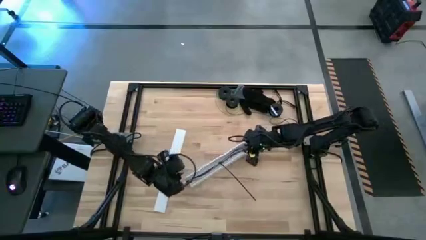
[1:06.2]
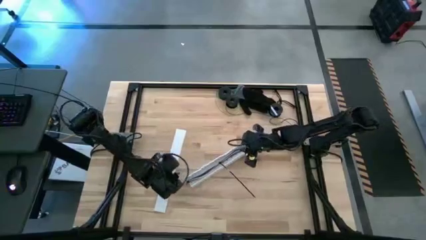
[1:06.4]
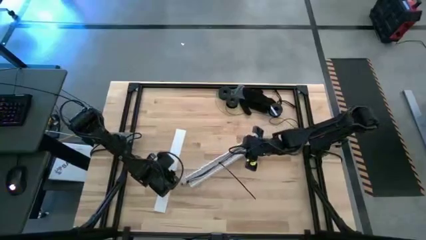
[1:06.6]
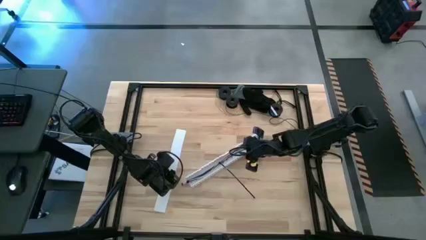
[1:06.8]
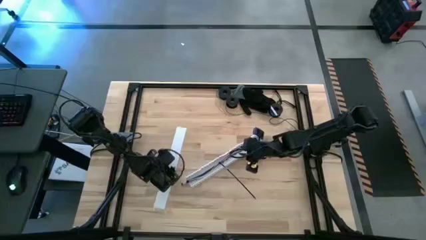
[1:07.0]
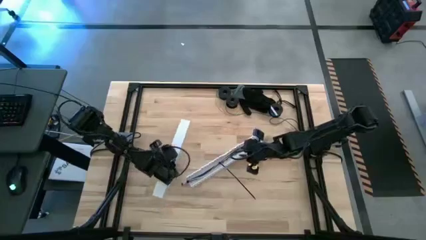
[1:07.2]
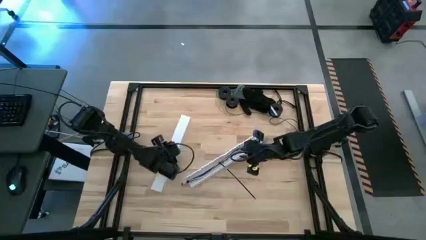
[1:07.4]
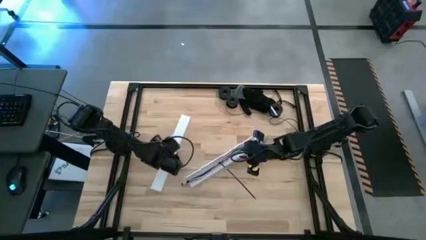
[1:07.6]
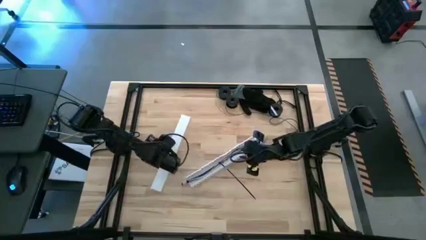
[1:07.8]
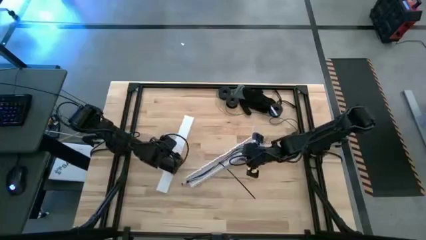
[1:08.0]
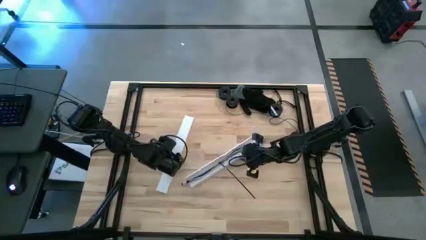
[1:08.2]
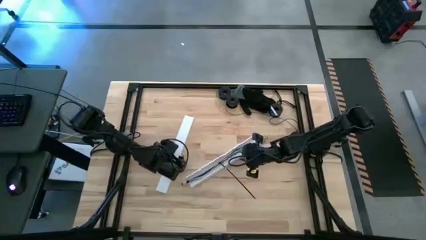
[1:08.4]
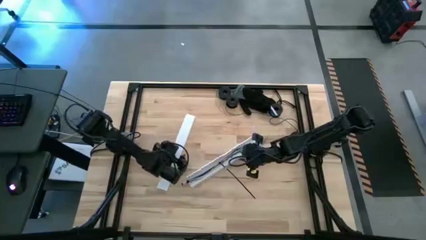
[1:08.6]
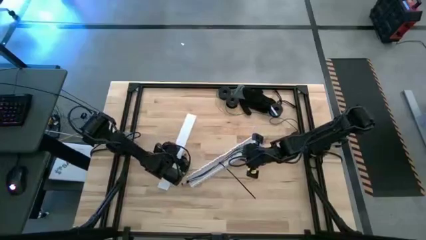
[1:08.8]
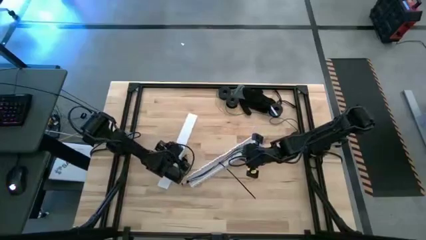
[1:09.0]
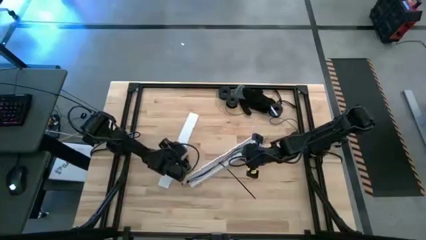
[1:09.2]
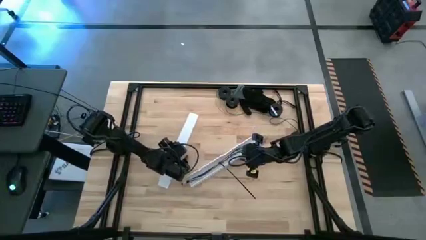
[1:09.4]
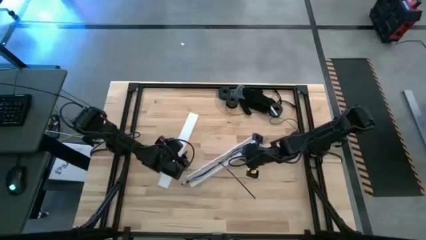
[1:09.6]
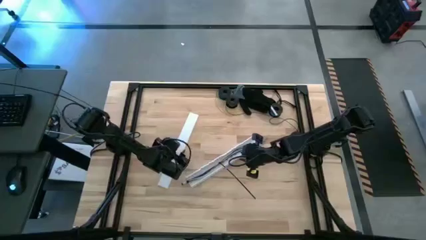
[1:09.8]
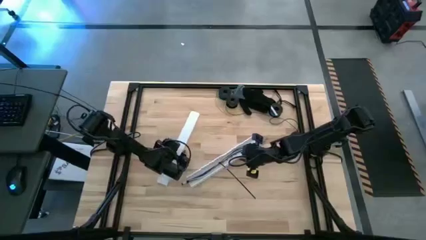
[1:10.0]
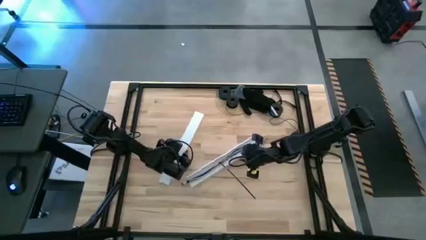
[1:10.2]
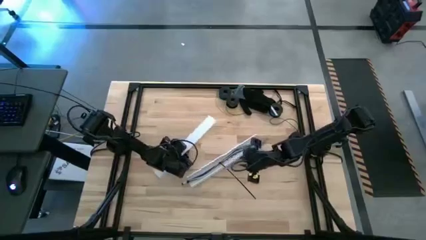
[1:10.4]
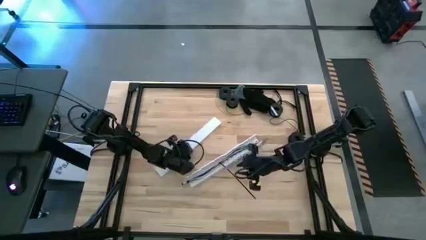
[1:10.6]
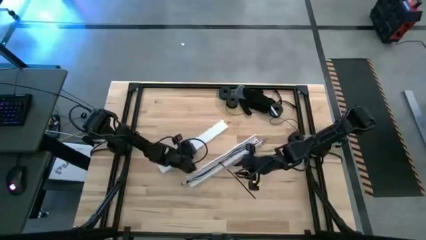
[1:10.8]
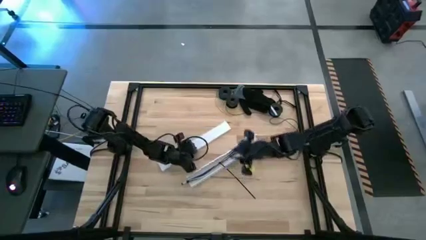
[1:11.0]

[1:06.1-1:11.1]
Task: Ziptie cables
Close the white cable duct

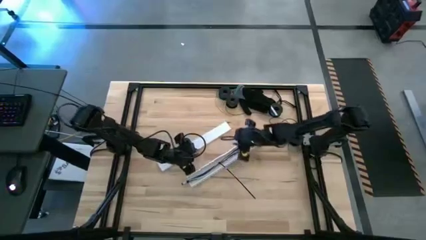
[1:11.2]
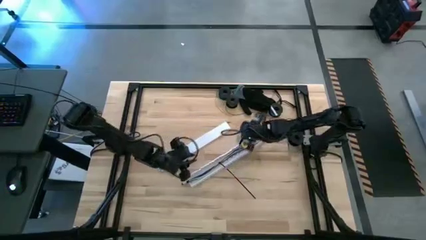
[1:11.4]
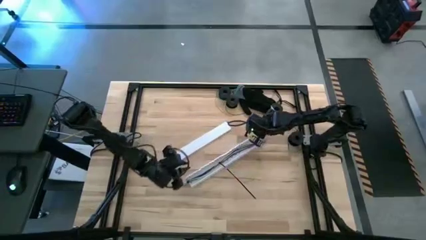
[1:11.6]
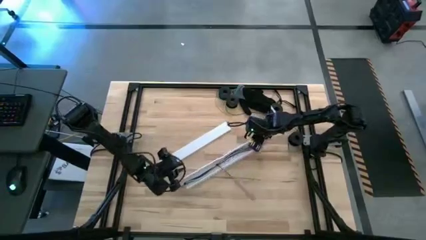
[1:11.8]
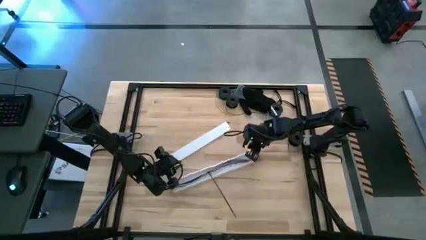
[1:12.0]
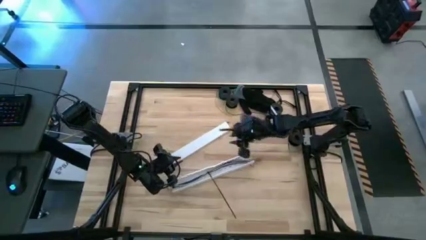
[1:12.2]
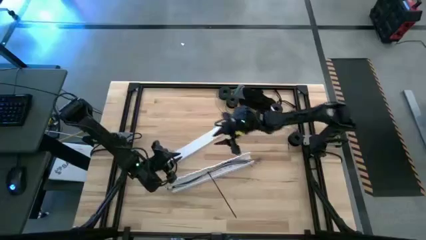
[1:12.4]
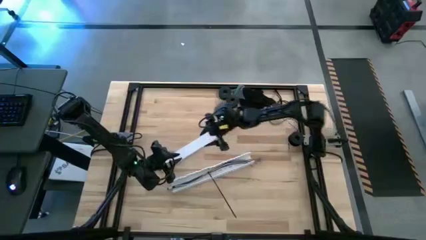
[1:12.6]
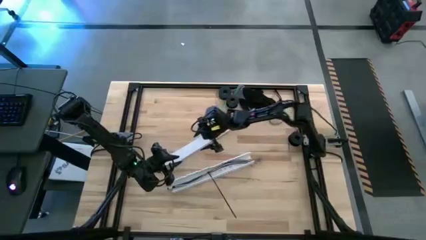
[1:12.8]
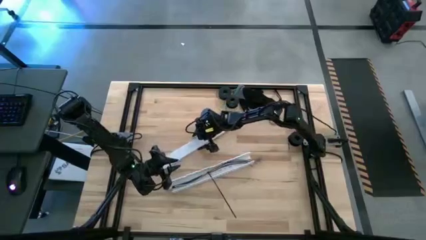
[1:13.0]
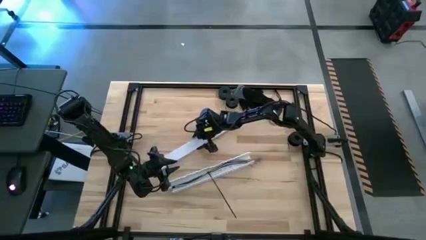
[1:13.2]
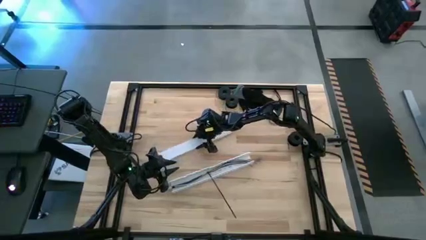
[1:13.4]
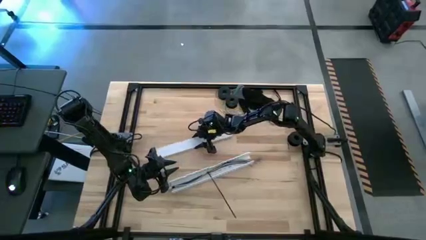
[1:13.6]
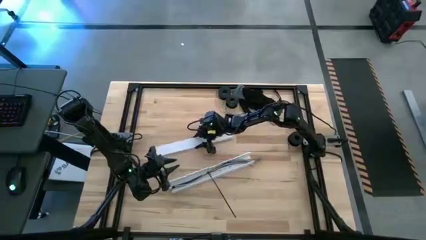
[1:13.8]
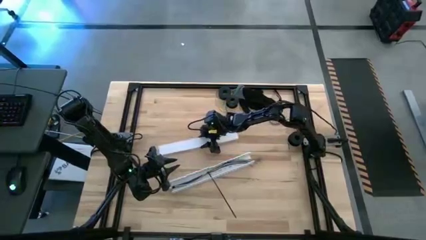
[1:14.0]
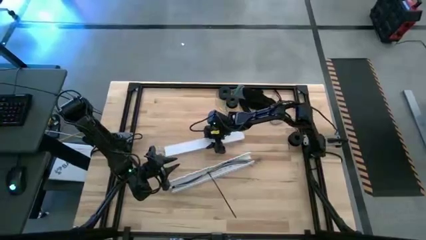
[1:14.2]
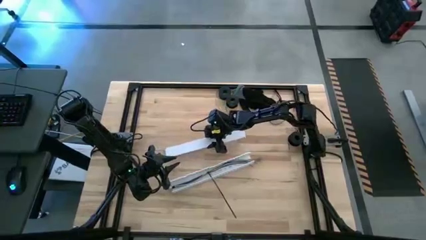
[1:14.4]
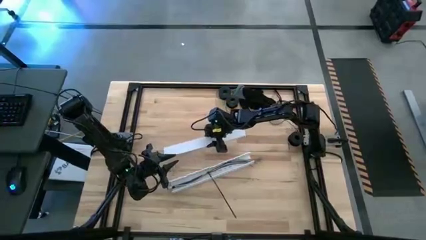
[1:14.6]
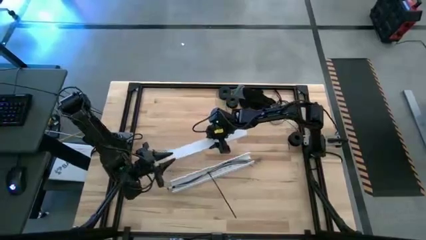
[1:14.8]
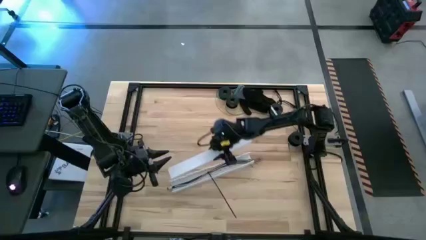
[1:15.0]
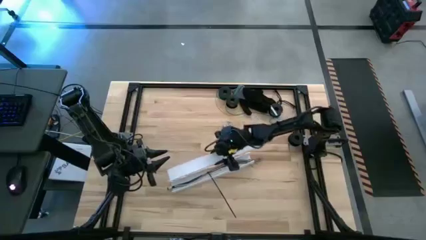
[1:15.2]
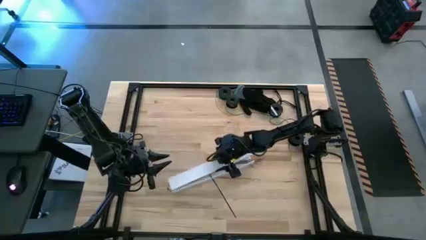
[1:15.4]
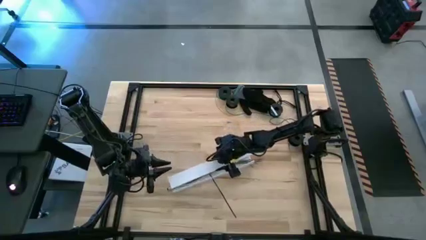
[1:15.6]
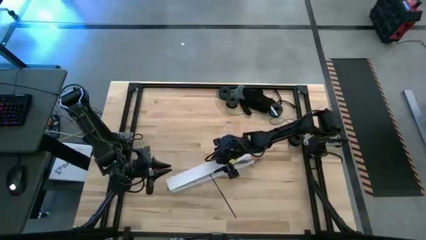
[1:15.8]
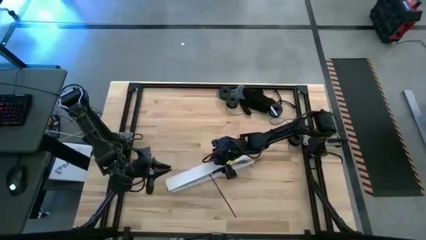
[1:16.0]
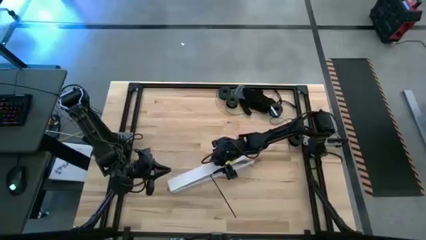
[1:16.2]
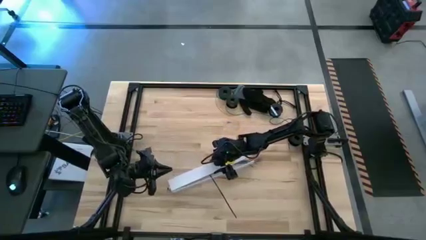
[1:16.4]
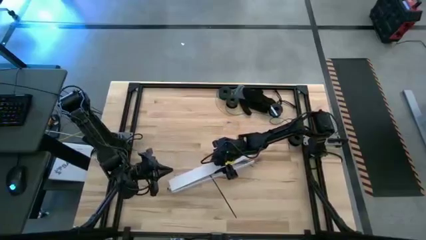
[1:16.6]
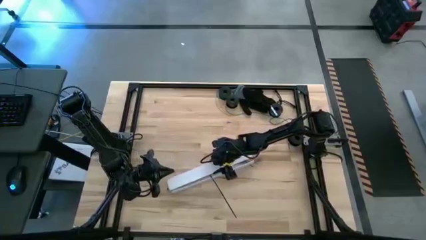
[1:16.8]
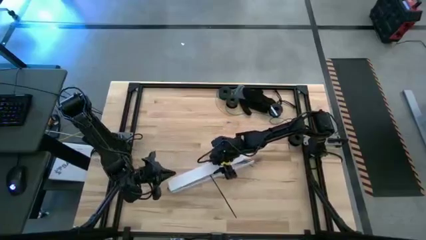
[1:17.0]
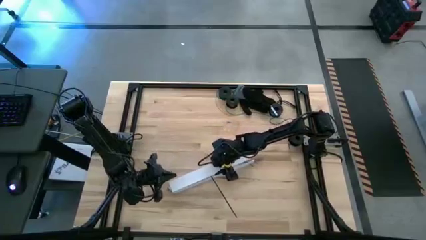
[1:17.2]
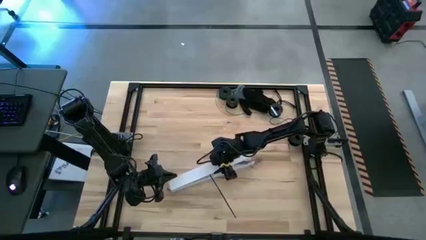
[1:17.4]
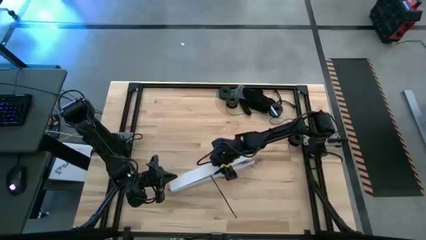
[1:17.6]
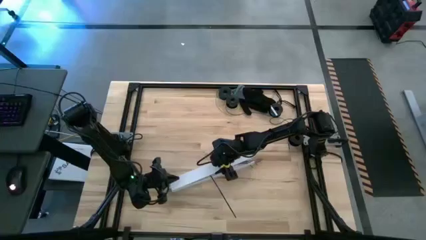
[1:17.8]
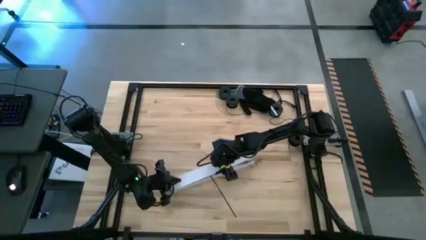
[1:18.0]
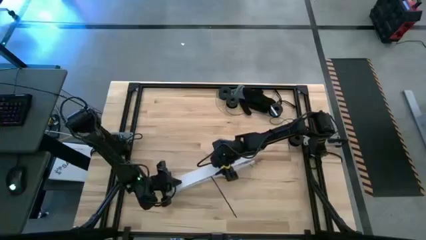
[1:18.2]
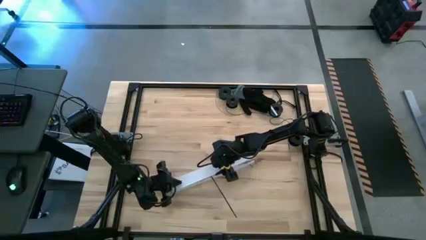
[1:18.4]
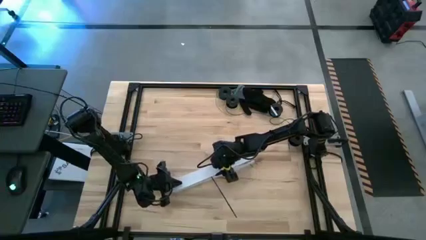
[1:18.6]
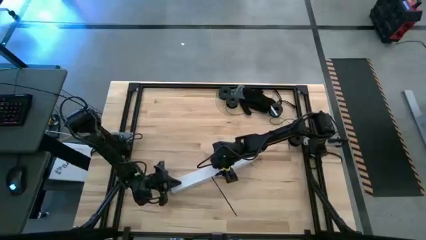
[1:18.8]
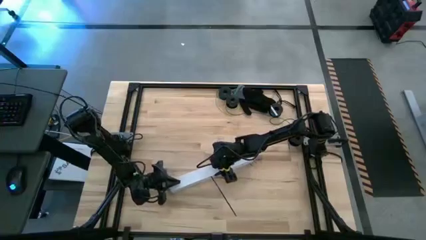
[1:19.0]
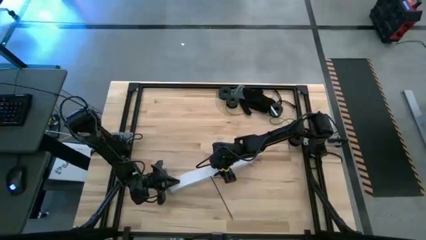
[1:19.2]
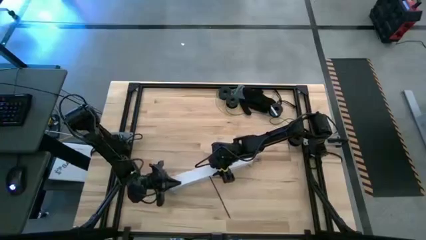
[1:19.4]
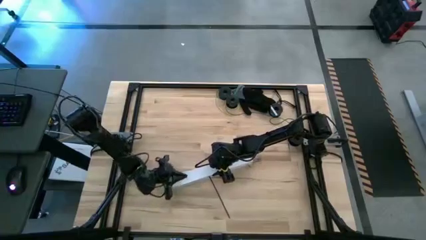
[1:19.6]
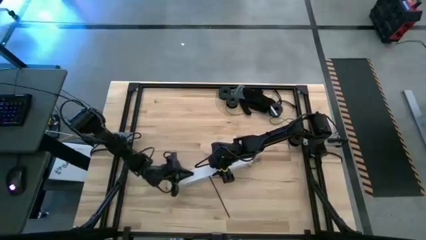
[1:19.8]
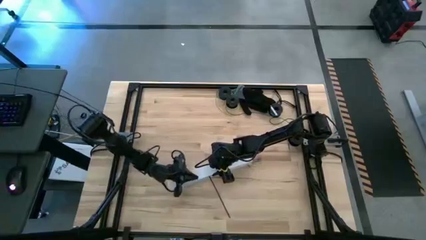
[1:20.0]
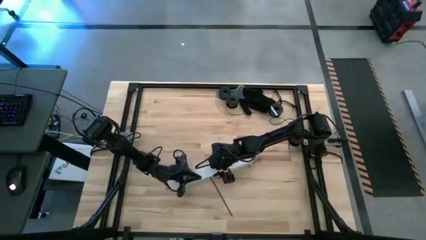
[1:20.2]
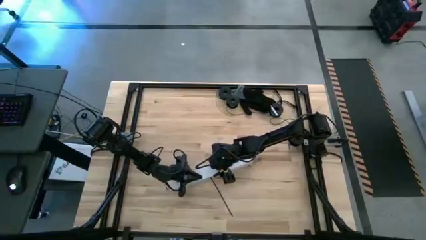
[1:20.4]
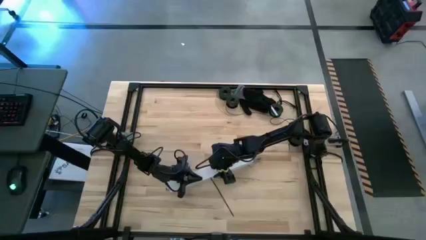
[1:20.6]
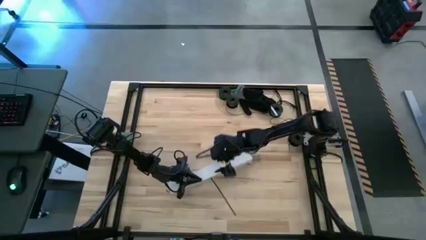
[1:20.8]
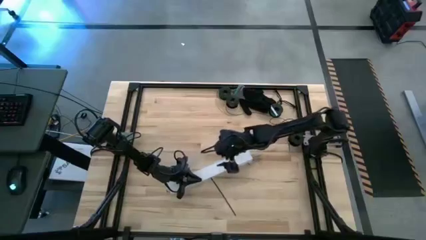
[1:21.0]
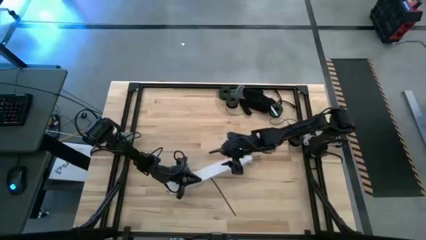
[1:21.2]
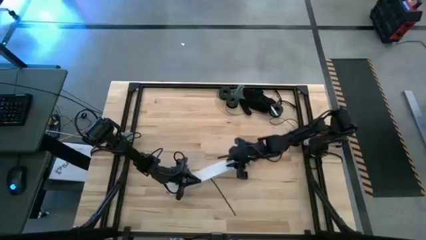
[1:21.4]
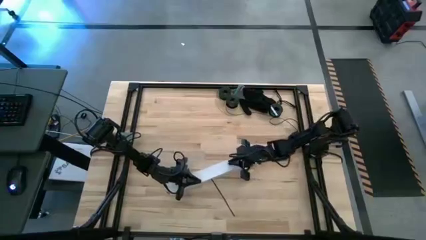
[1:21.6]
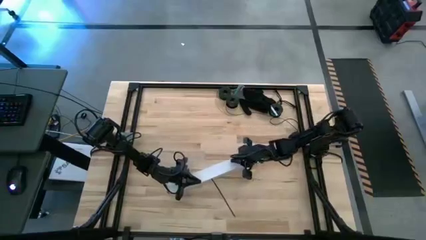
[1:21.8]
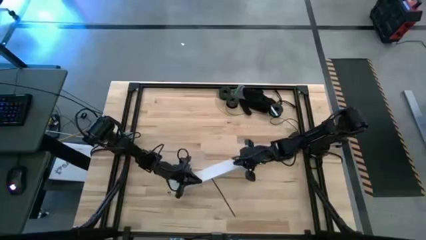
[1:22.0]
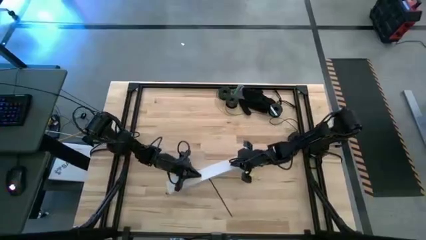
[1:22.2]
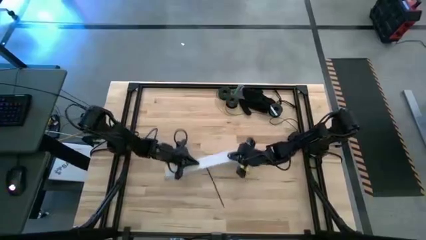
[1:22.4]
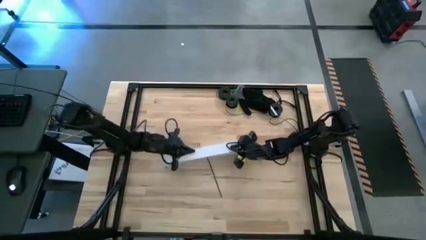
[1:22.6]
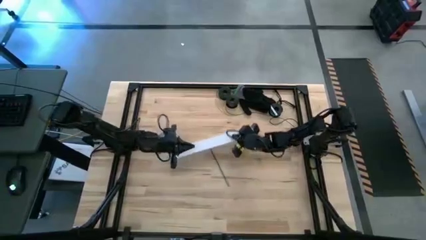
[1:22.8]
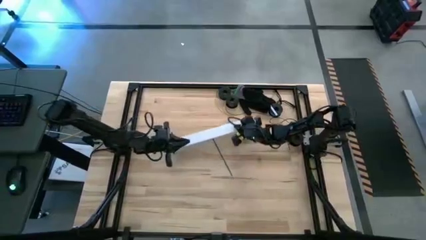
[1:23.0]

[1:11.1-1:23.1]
Close the white cable duct
